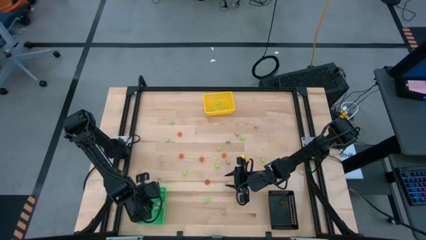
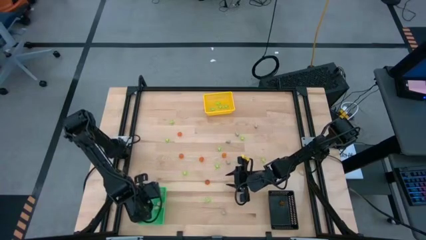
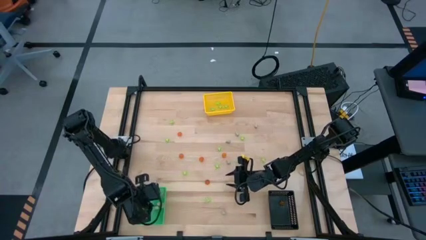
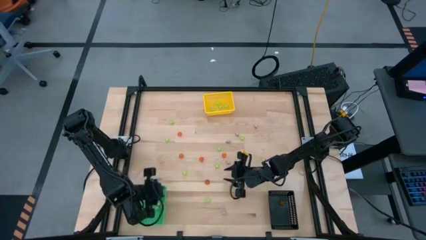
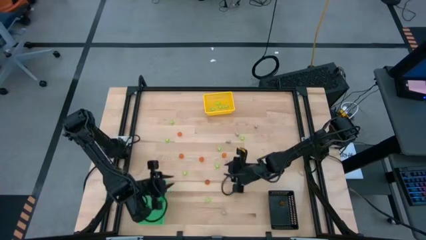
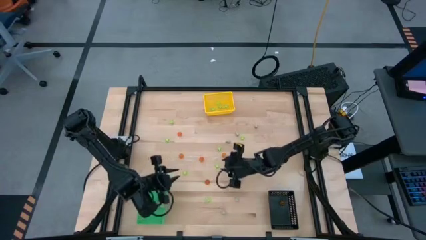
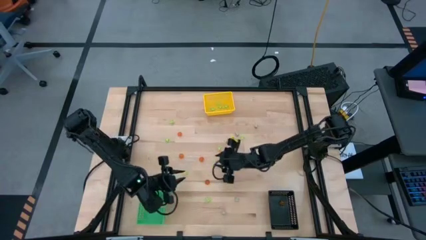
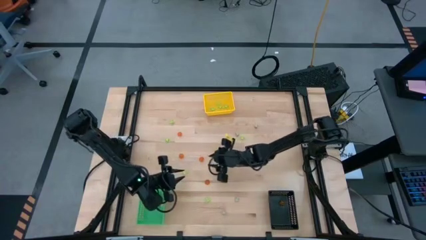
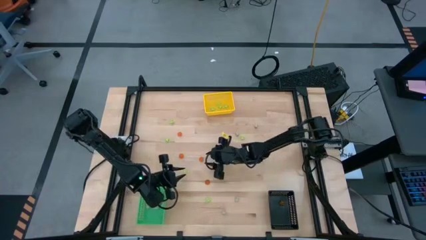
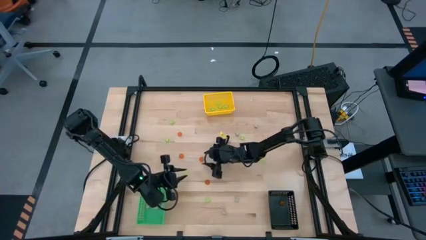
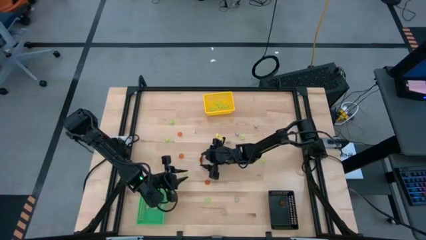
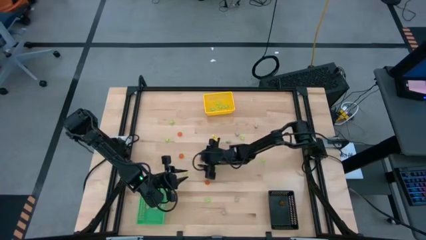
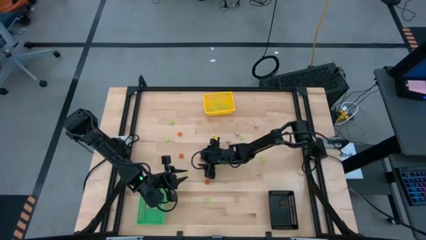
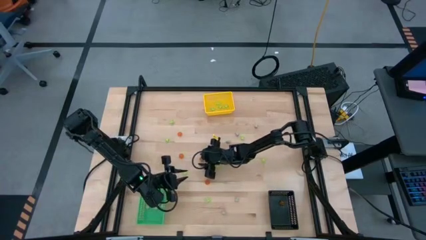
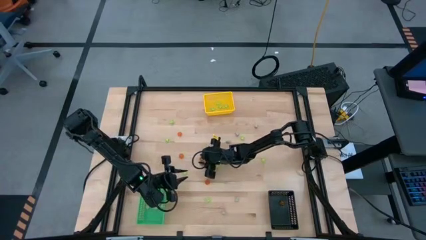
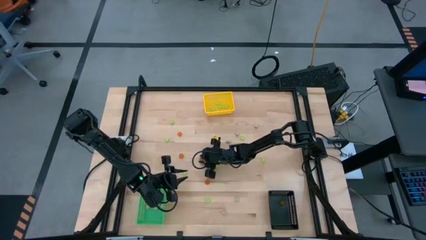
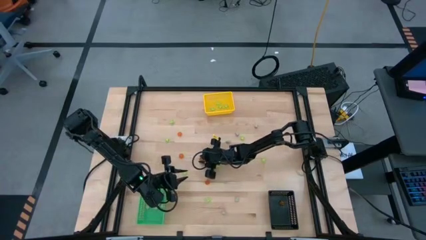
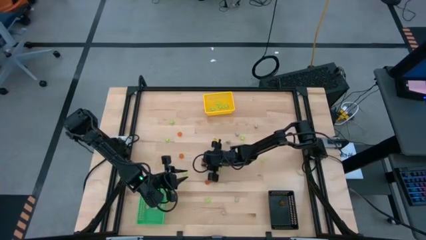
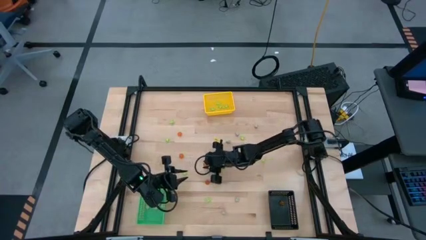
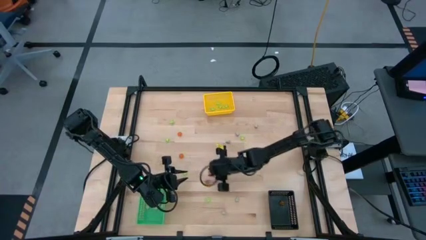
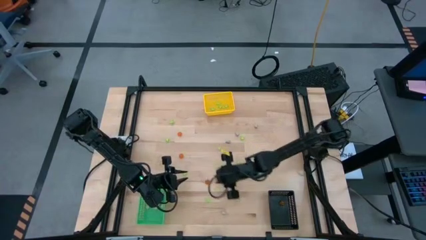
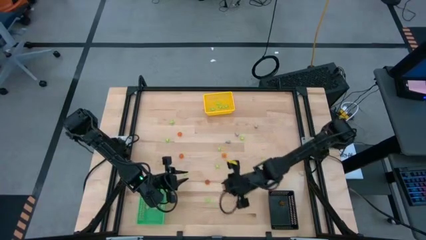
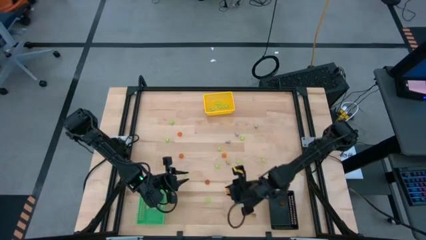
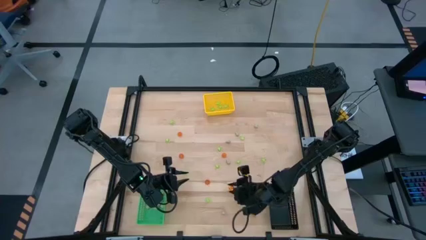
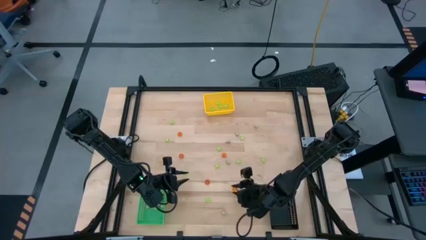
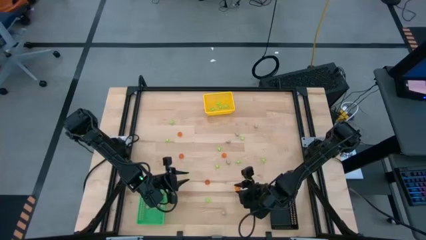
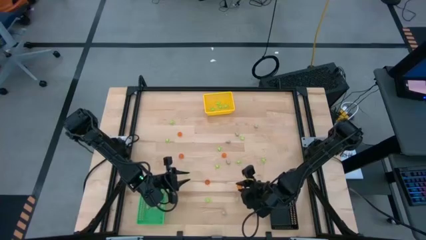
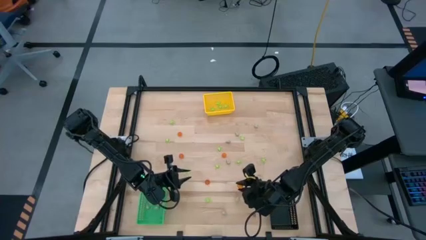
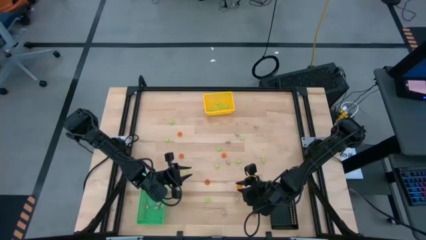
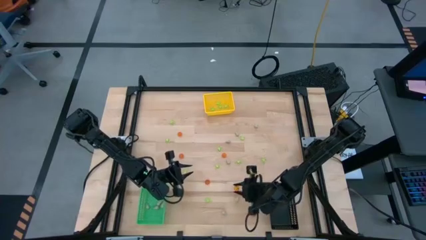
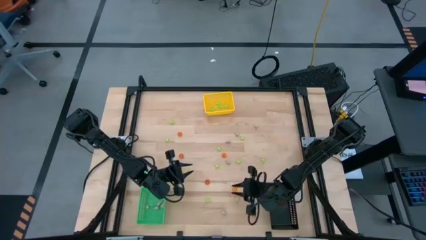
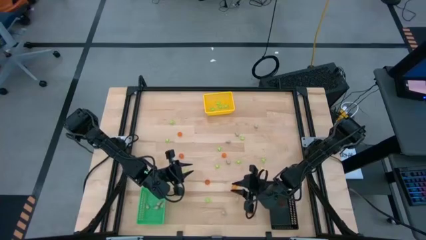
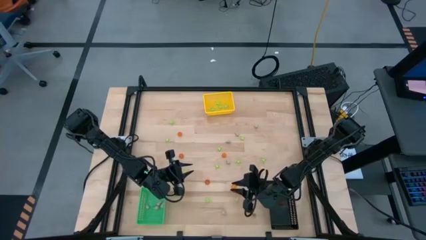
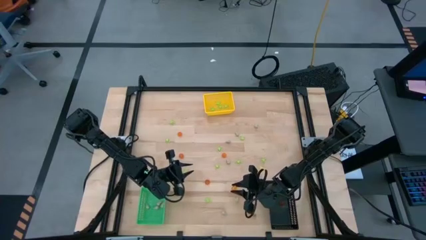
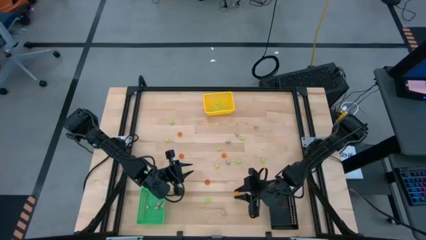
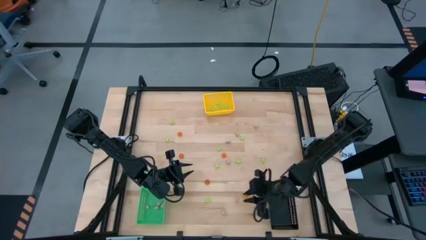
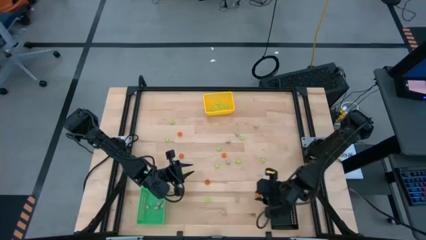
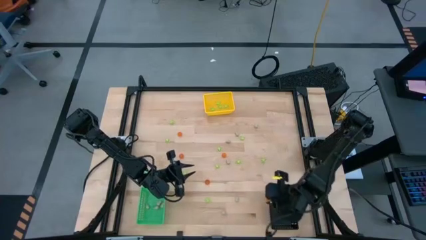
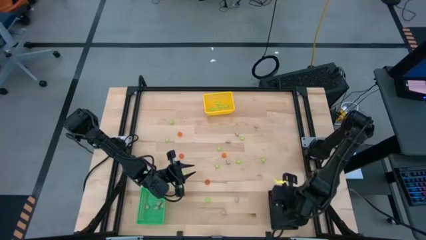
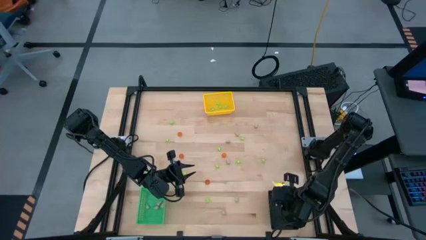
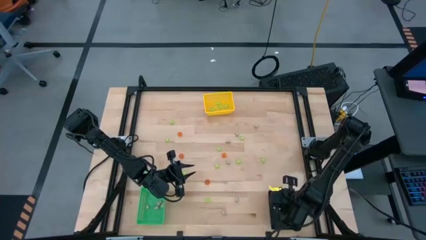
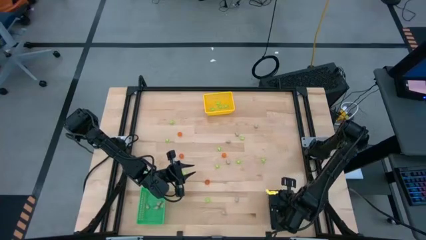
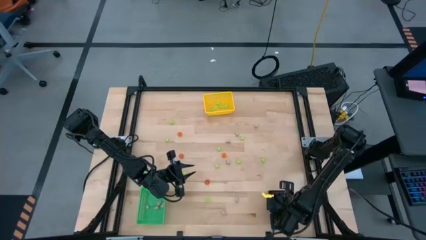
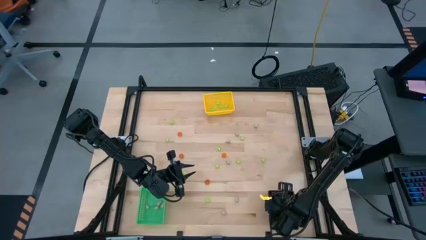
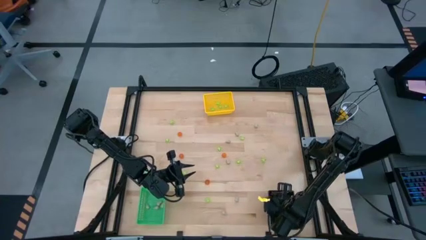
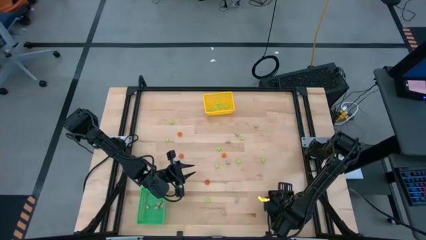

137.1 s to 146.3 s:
Task: Sort Halloween decoration
Put the orange pumpkin toy into the black bin
